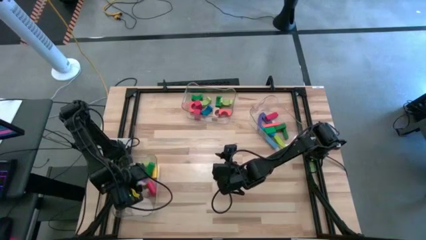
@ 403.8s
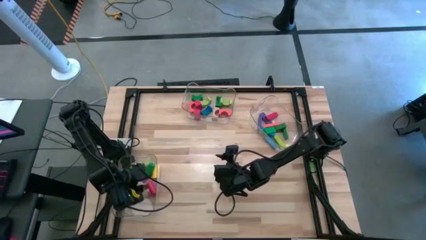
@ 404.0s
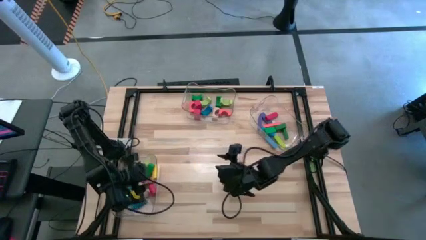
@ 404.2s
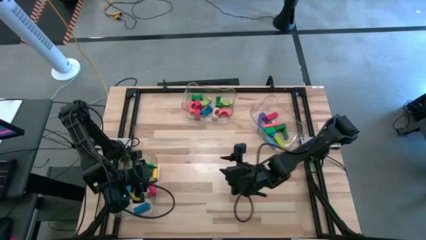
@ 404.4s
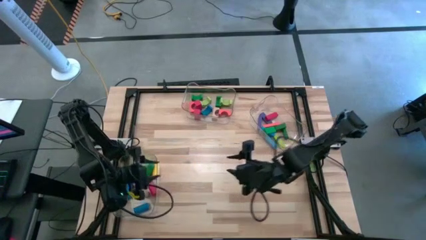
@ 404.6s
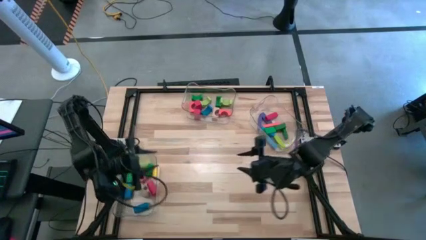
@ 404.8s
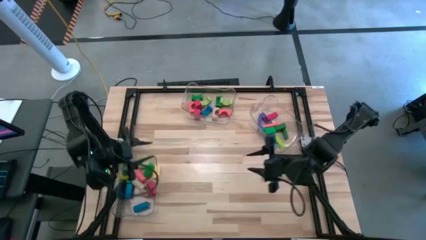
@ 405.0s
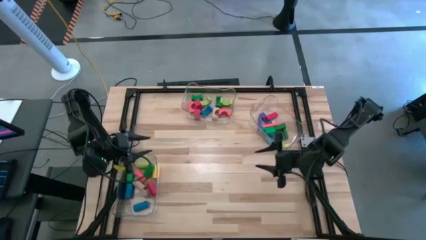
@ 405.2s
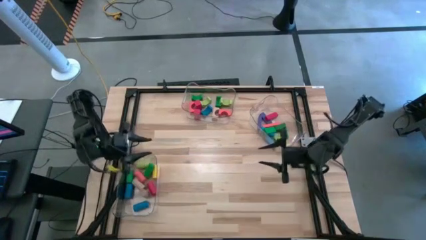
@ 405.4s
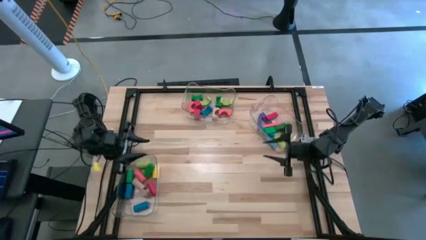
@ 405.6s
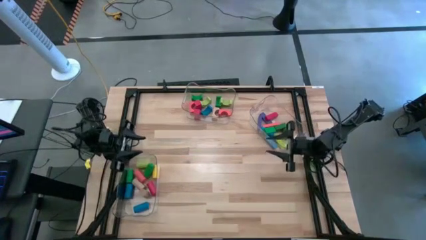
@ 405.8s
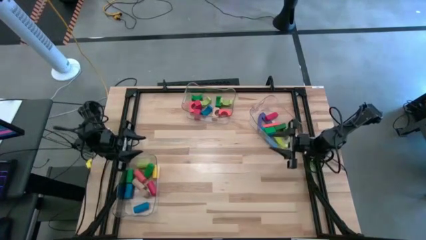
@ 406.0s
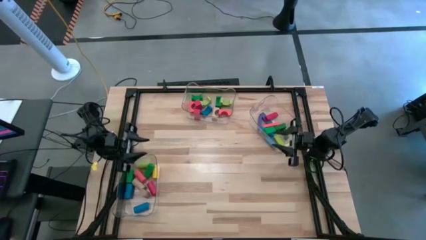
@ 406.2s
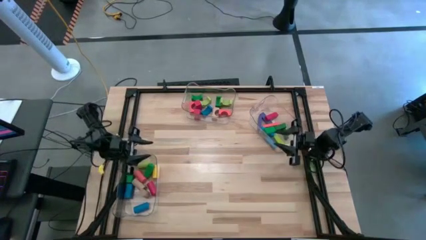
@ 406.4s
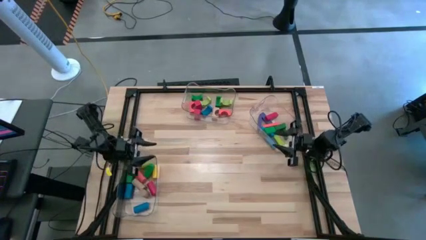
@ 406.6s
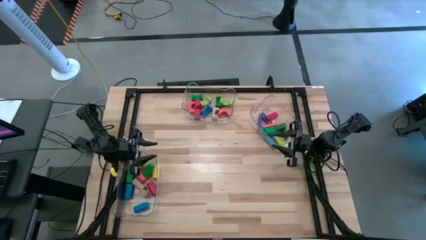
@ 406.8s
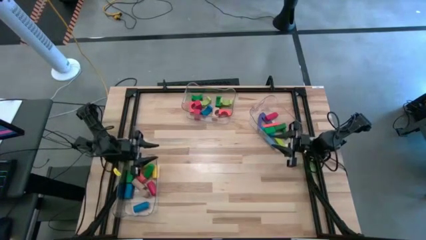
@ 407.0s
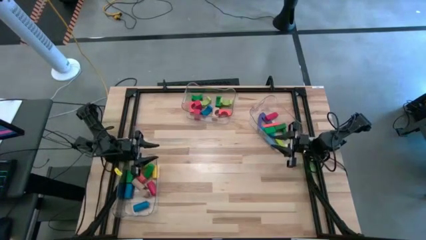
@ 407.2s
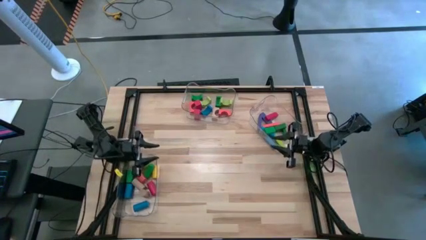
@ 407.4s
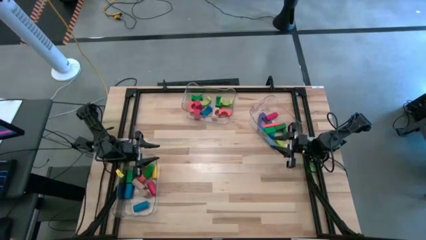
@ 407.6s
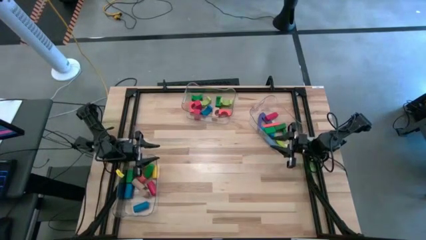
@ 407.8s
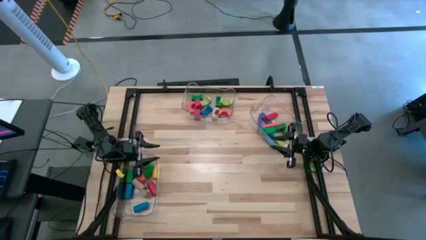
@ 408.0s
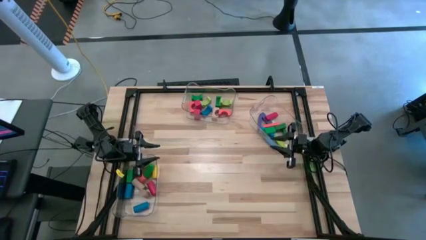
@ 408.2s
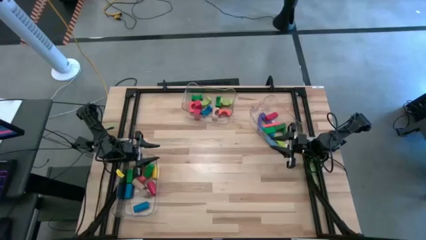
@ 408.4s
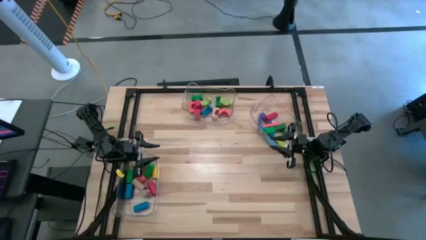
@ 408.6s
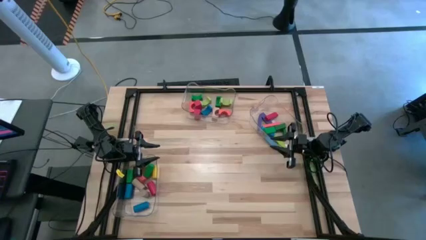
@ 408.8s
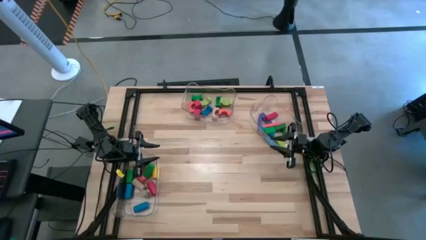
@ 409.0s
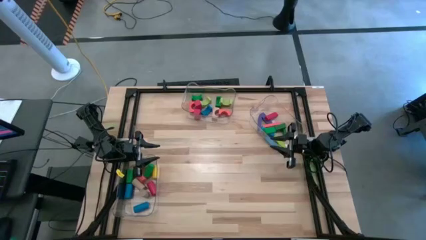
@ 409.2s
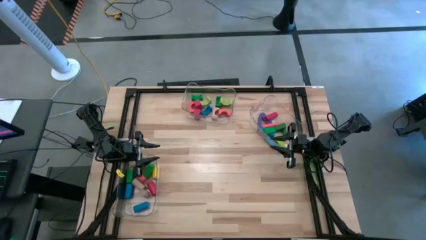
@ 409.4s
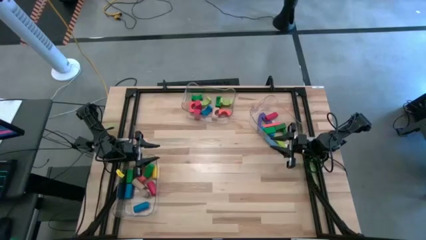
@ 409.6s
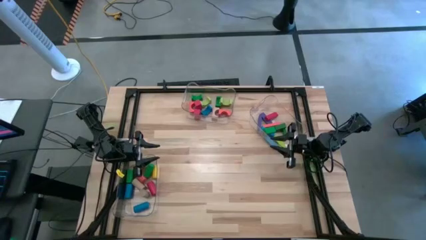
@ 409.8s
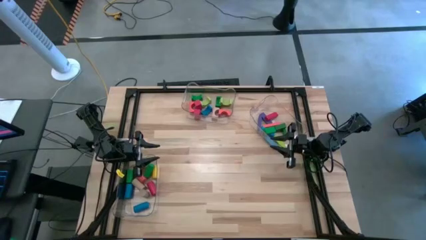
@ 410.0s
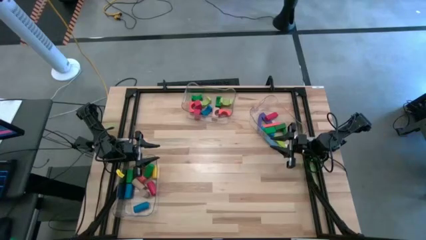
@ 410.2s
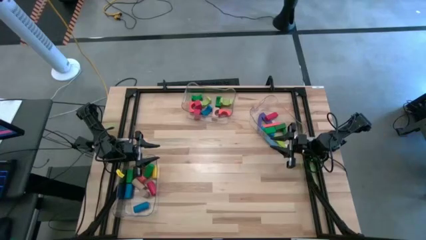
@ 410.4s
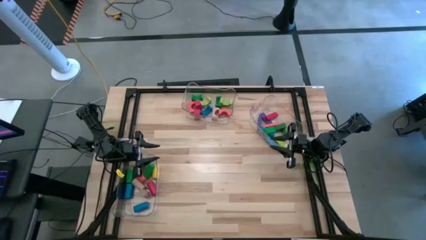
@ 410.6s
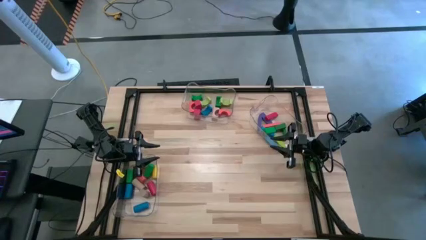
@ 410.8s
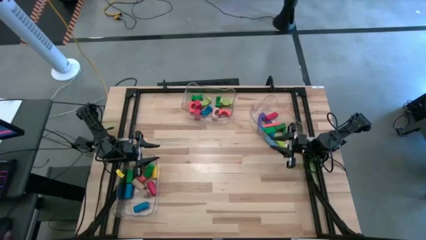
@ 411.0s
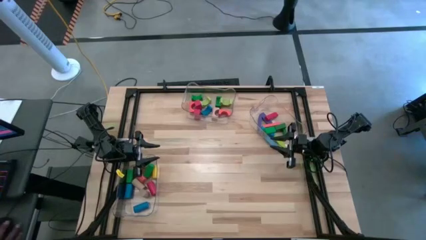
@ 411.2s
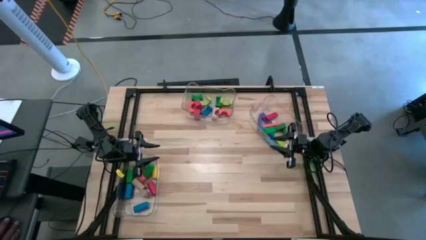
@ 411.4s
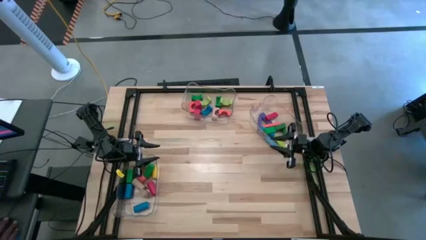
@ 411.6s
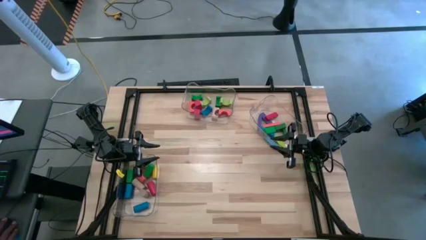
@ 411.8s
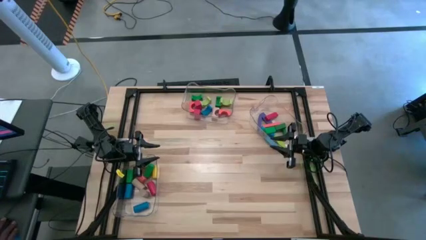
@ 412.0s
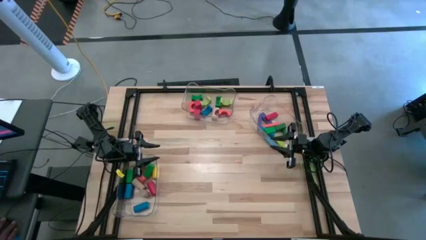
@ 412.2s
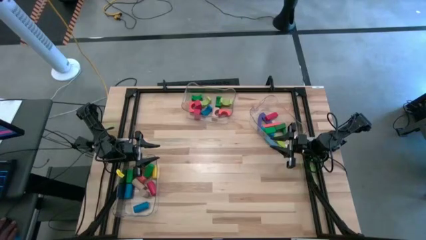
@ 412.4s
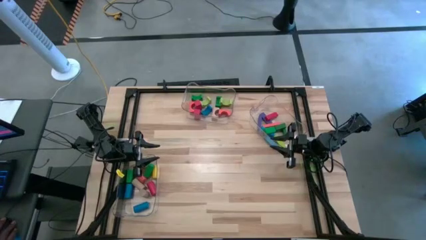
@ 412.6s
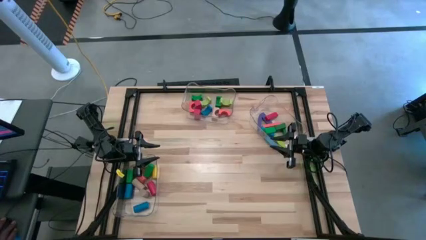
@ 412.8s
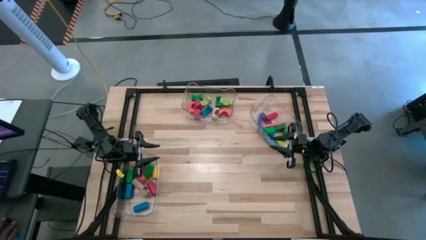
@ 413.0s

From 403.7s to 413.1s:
Task: Sort blocks by size
Return to Home Position
